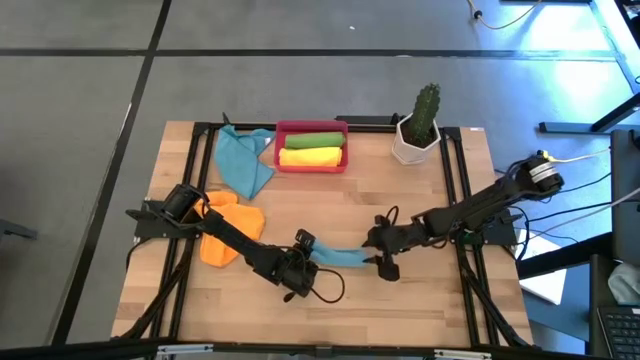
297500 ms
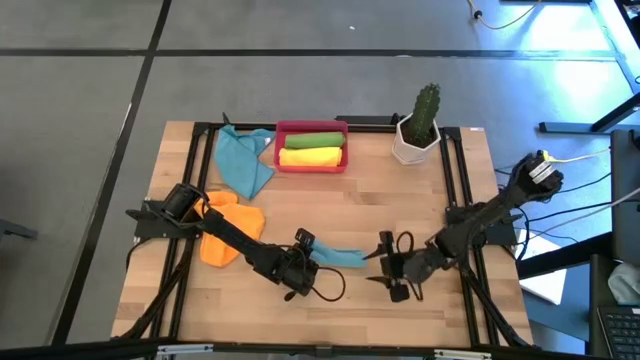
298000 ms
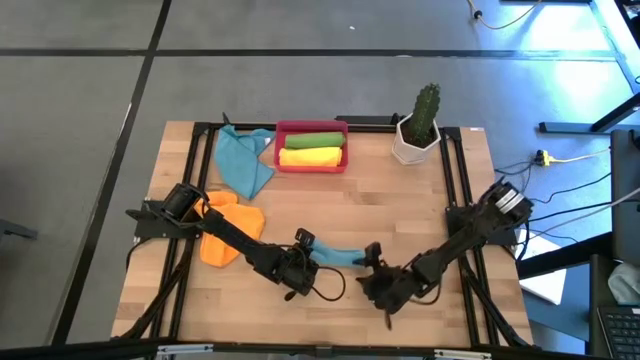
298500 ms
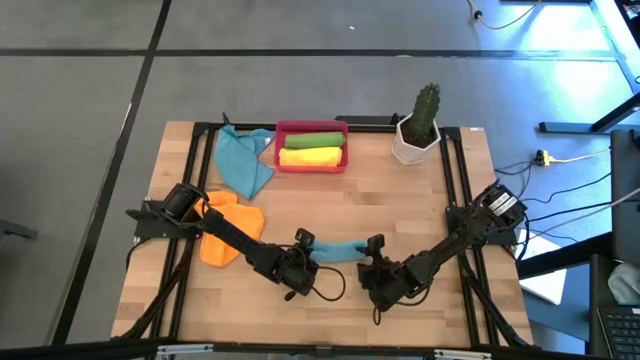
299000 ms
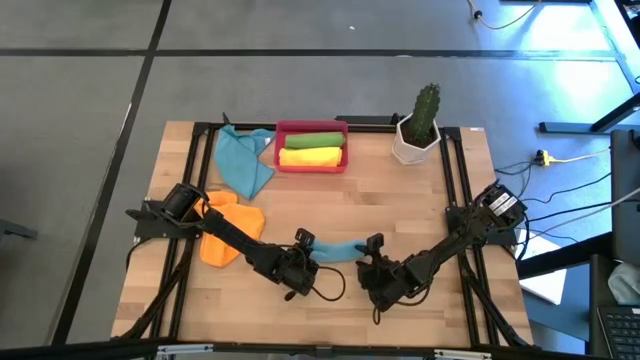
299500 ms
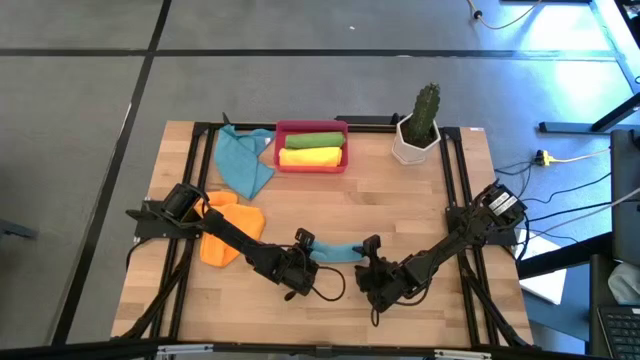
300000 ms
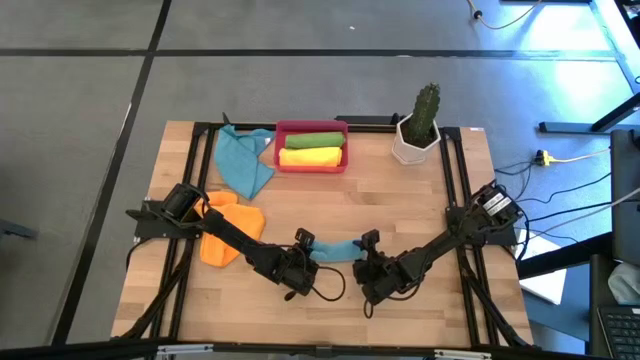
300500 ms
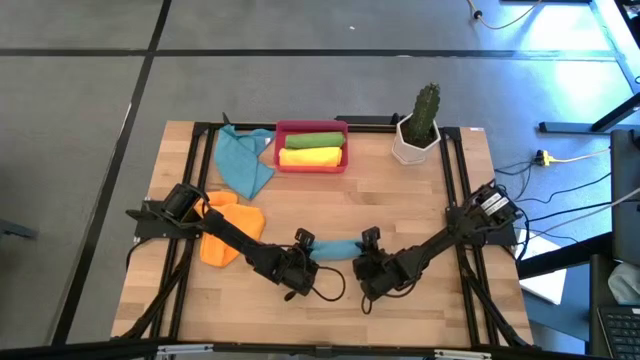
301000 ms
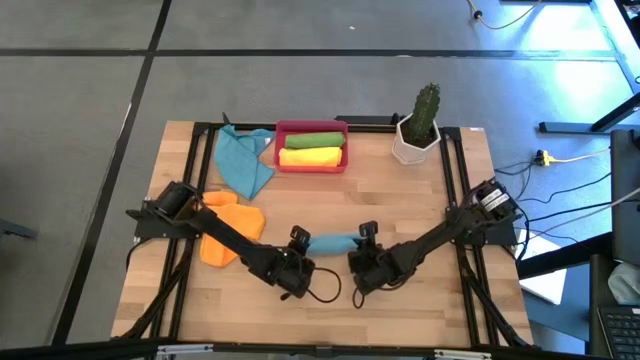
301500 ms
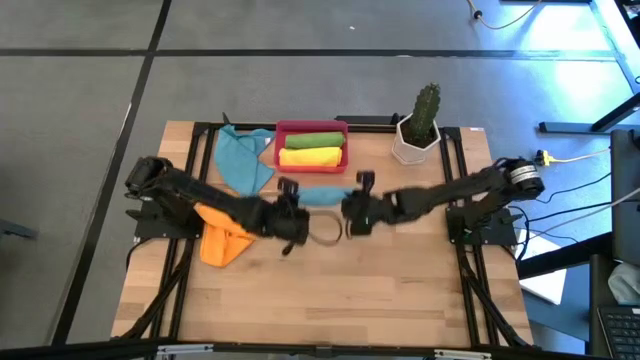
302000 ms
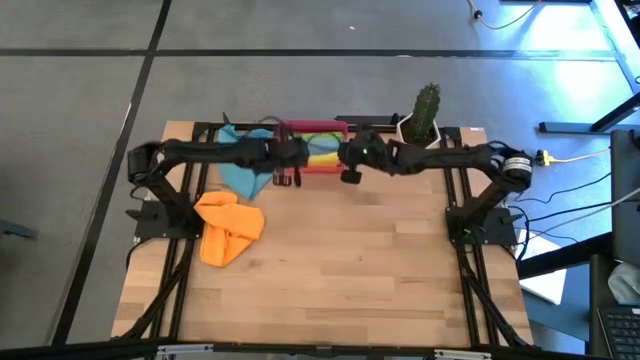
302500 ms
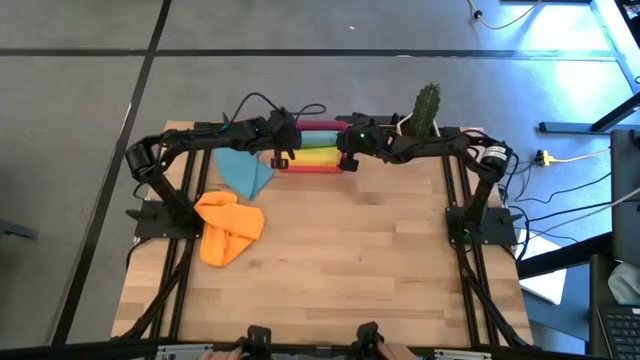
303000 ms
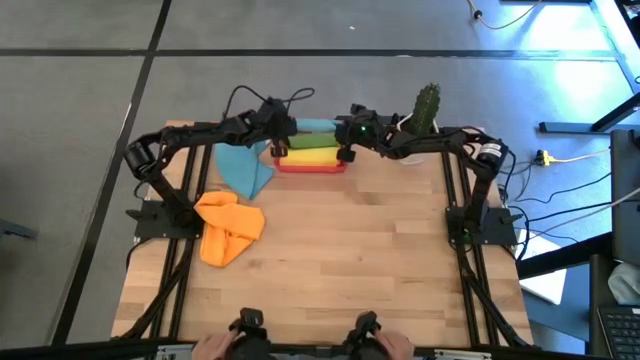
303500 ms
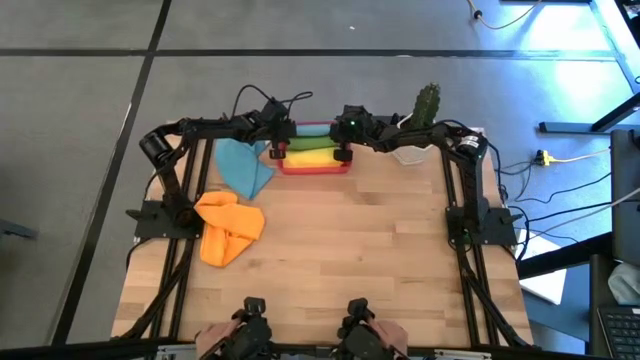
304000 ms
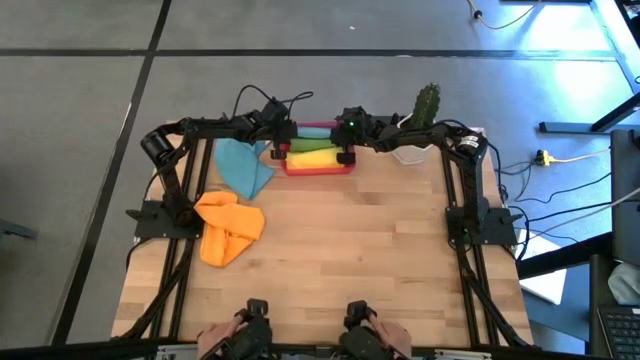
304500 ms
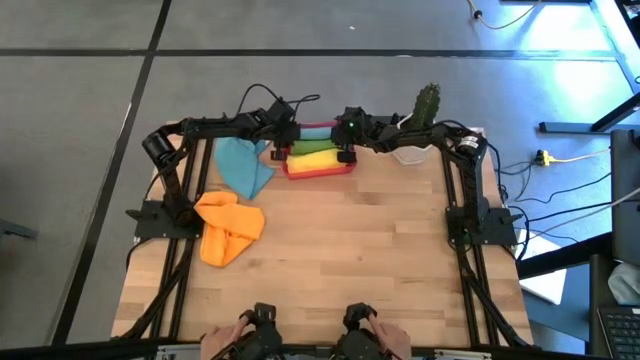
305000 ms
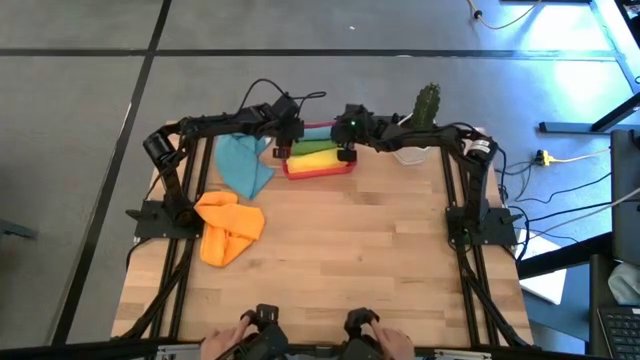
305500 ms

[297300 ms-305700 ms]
Task: Roll microfiber towels into tight, uniform cylinder then place into a basket
Put the rolled bottom blue towel into the red bin

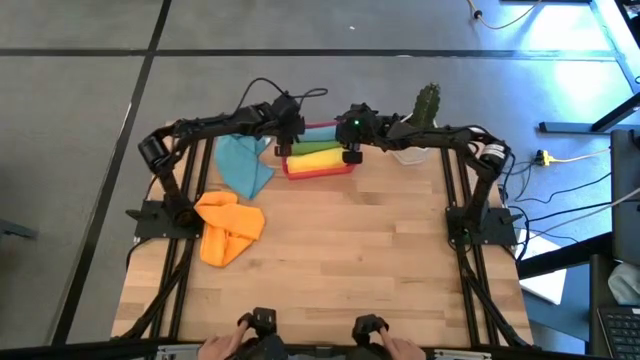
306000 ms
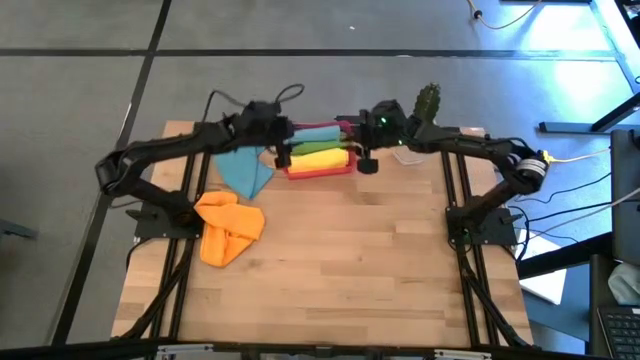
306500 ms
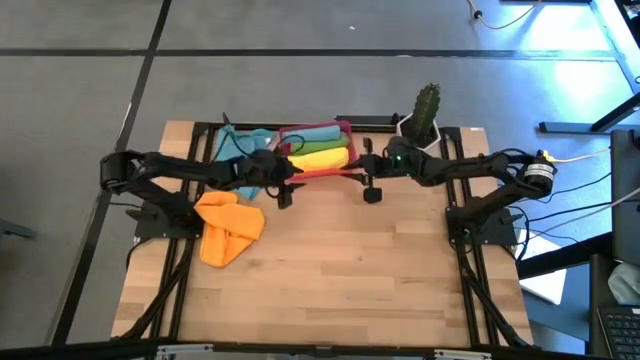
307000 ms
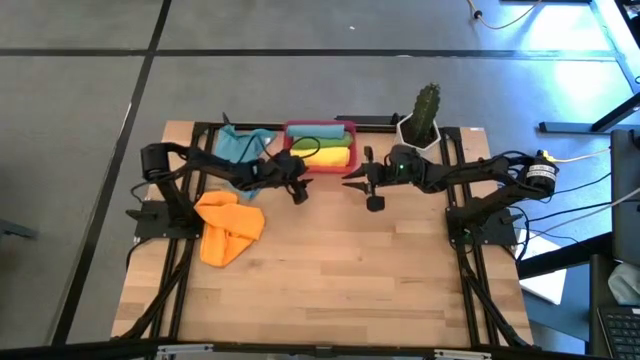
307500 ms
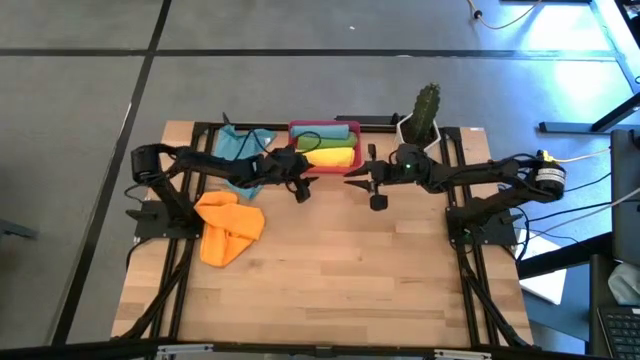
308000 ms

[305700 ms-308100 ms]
Adjust the red bin

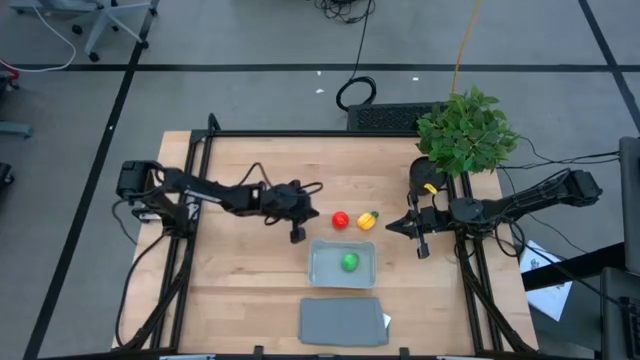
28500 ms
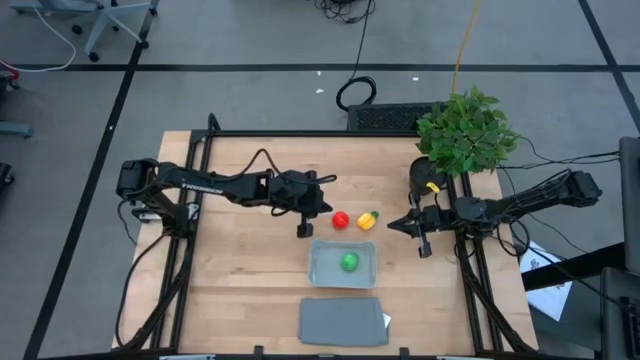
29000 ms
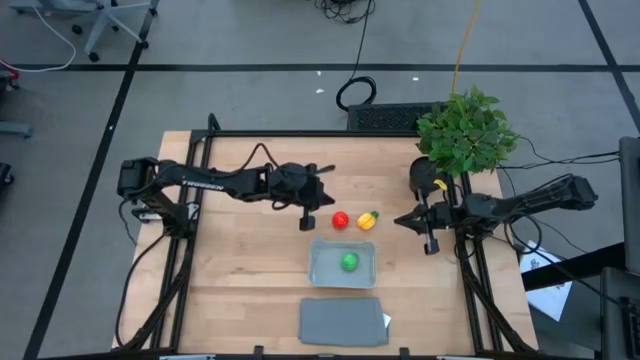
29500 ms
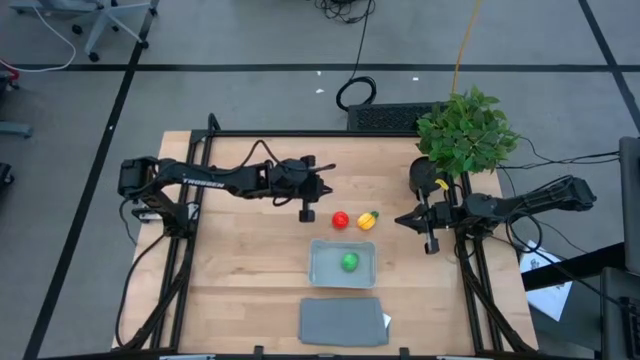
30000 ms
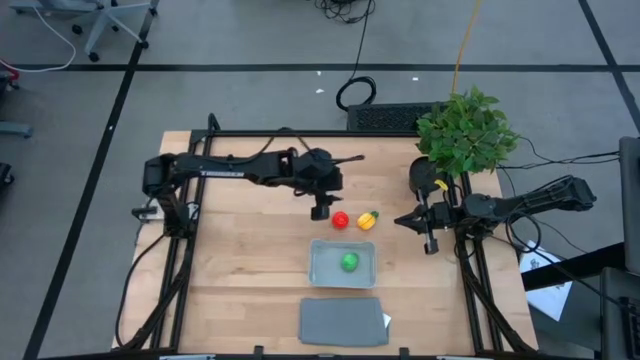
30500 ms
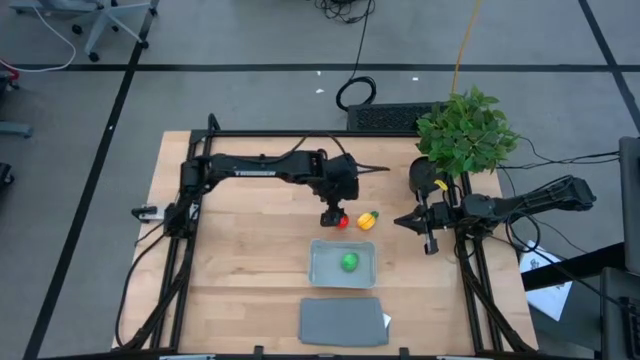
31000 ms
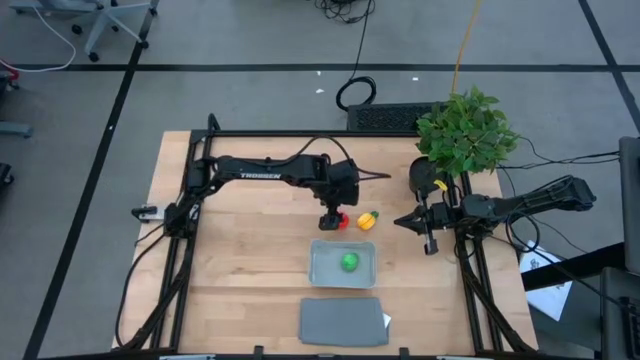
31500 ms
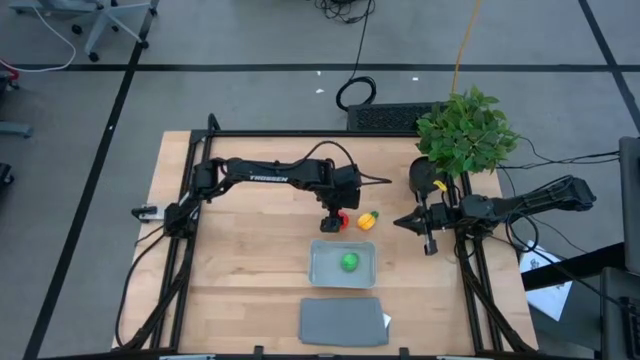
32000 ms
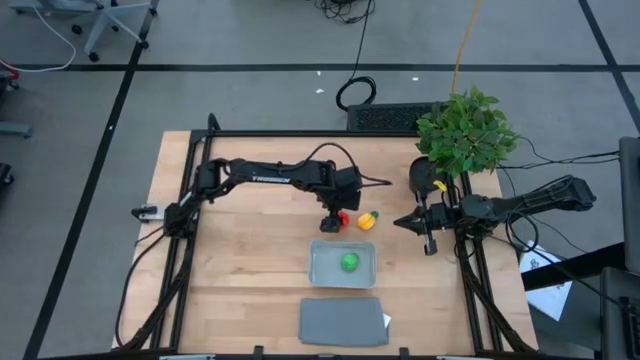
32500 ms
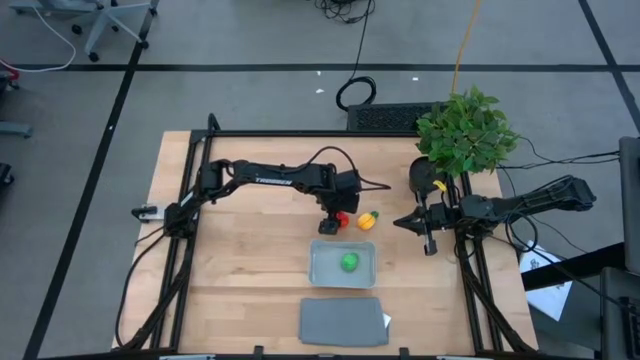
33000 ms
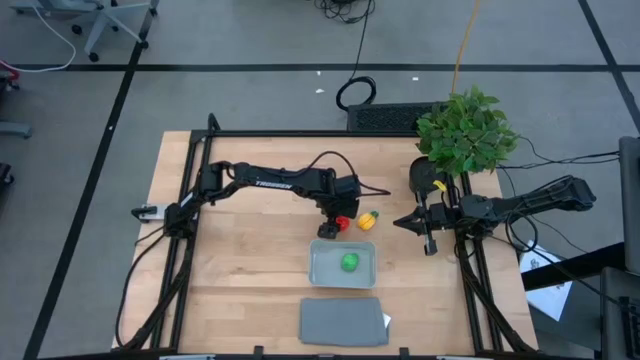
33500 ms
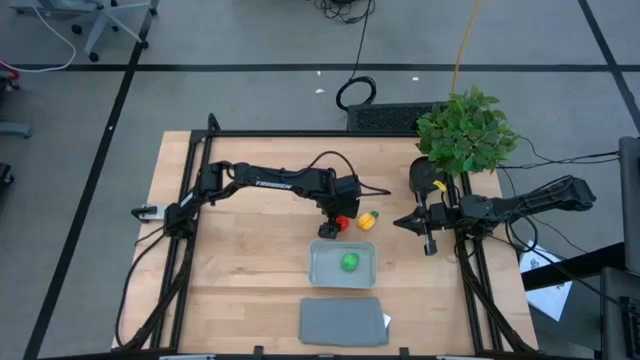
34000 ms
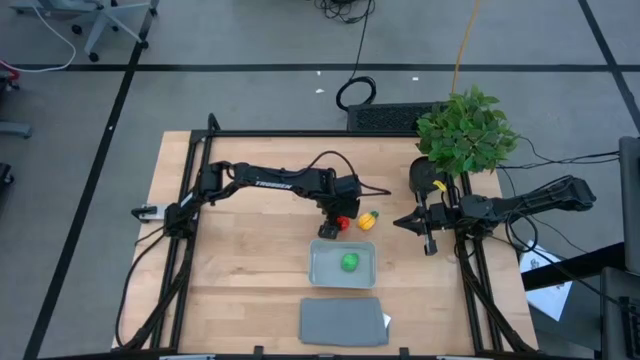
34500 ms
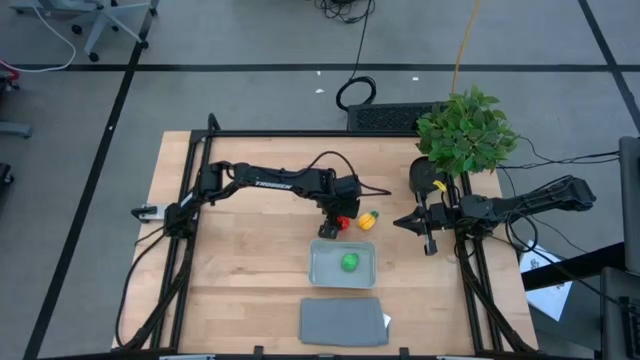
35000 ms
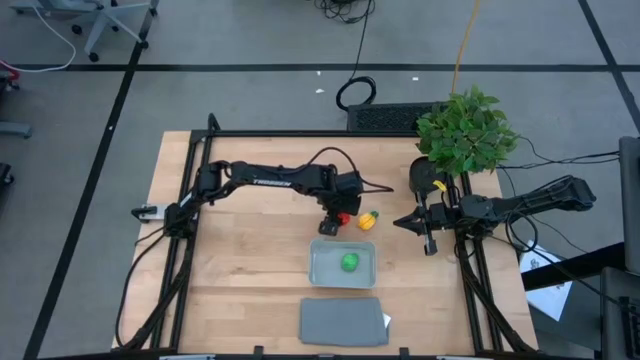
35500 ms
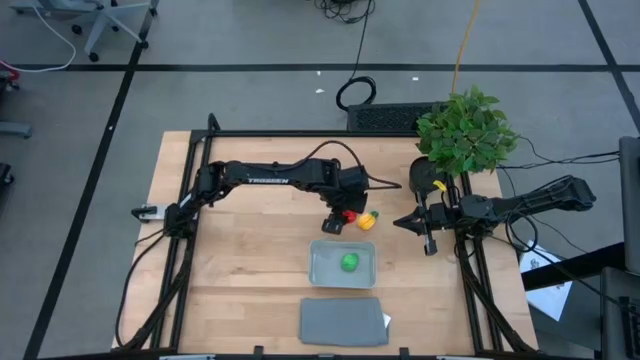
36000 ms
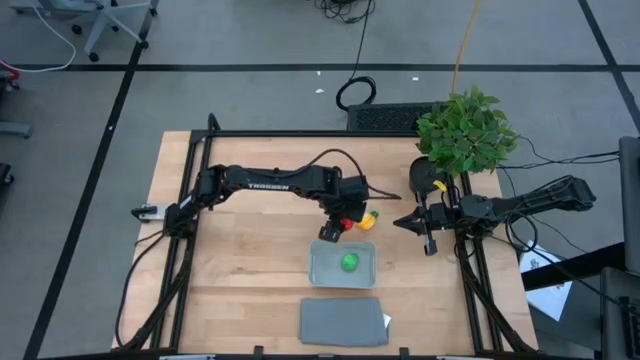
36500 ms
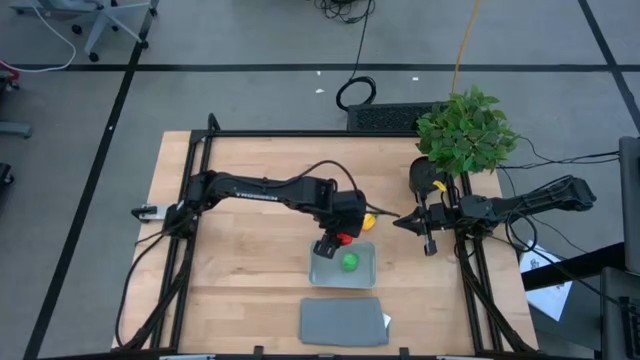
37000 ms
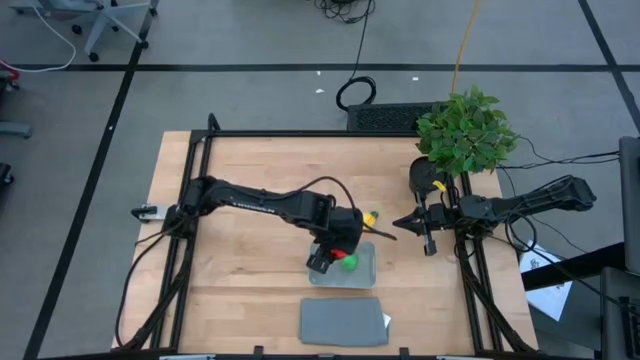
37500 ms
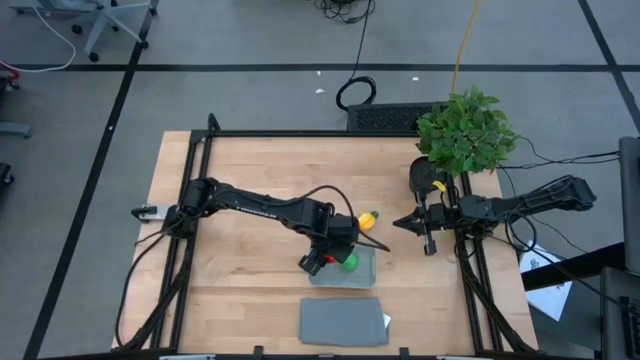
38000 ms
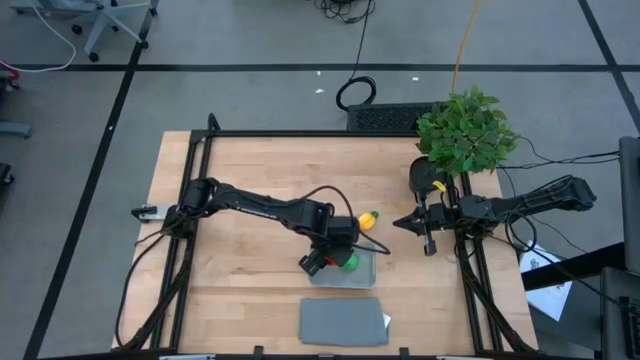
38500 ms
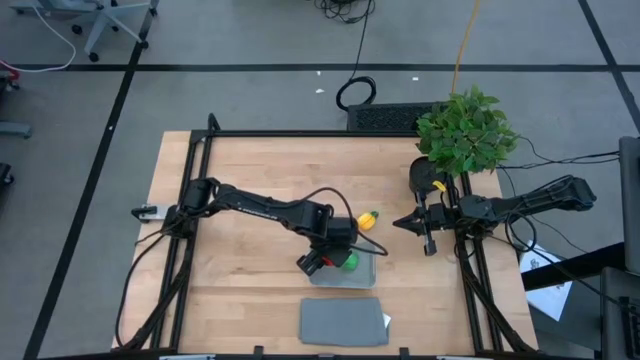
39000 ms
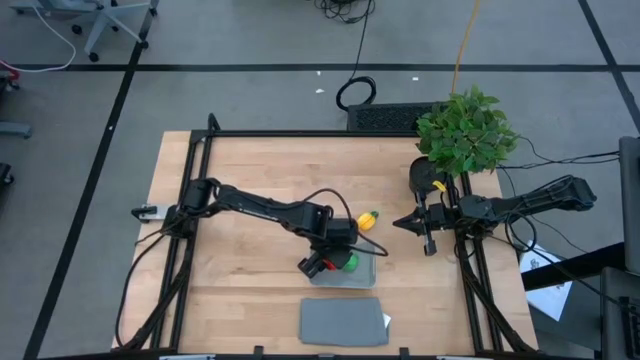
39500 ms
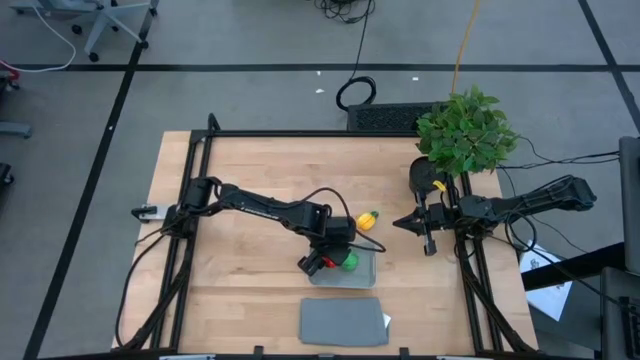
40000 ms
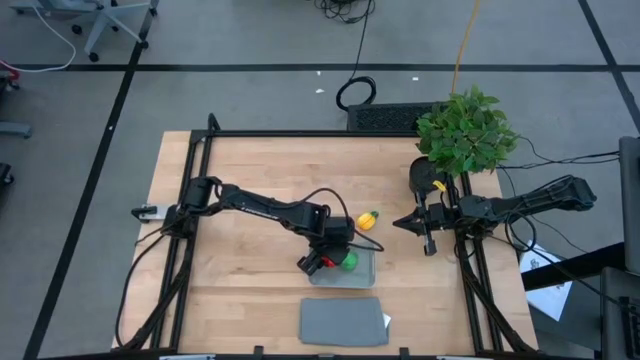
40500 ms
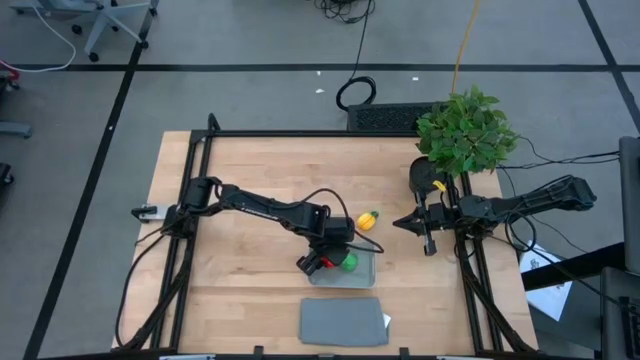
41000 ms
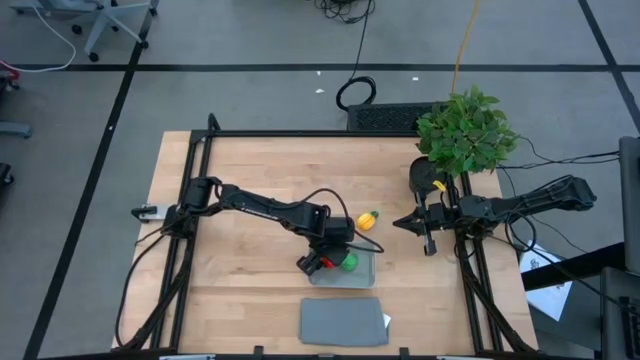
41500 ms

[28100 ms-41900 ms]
Task: Pick and placing Produce into tupperware
Put the red tomato into the gray bin
